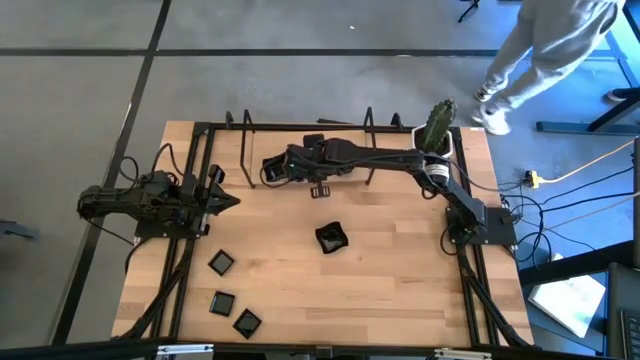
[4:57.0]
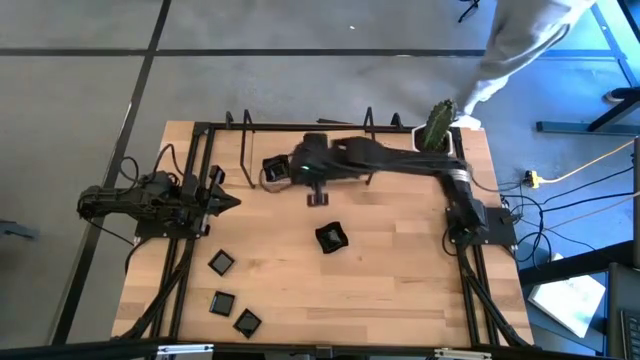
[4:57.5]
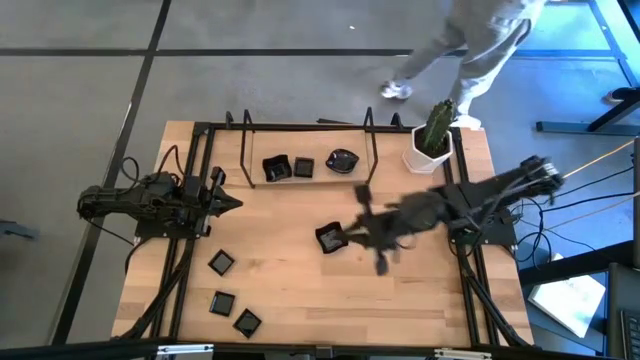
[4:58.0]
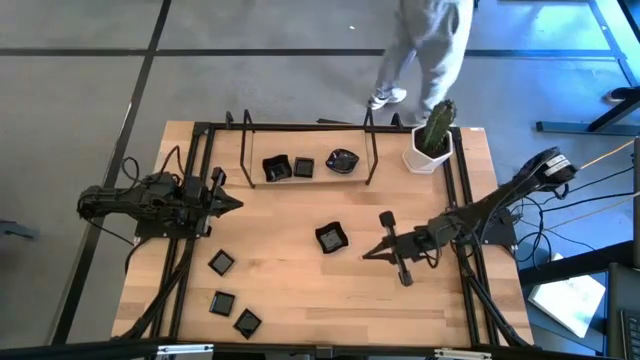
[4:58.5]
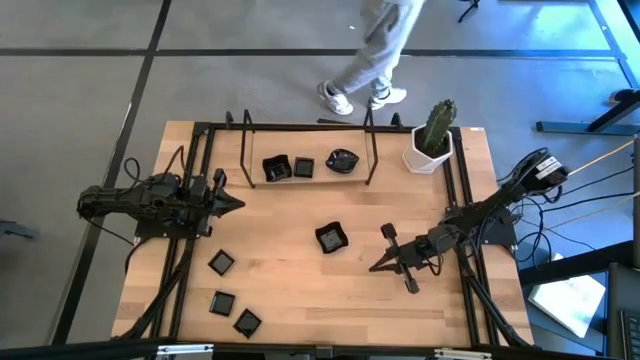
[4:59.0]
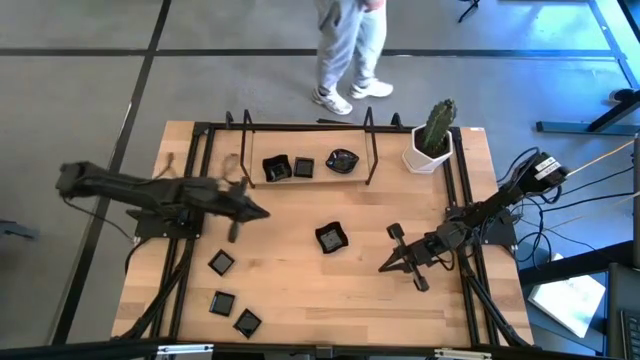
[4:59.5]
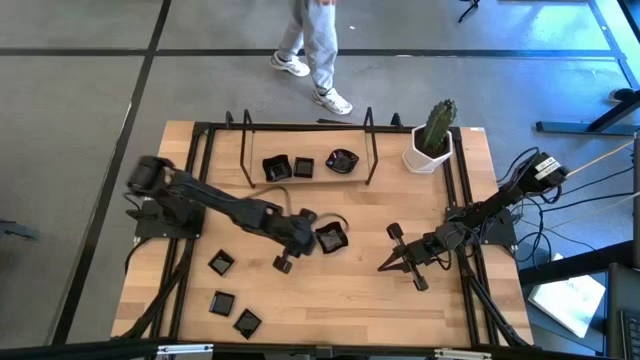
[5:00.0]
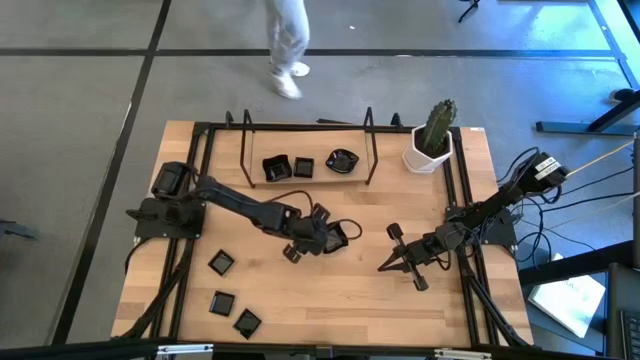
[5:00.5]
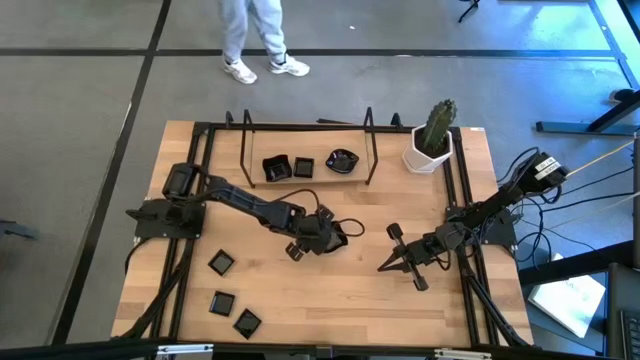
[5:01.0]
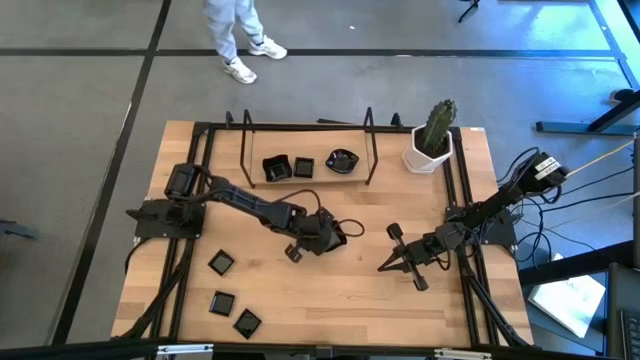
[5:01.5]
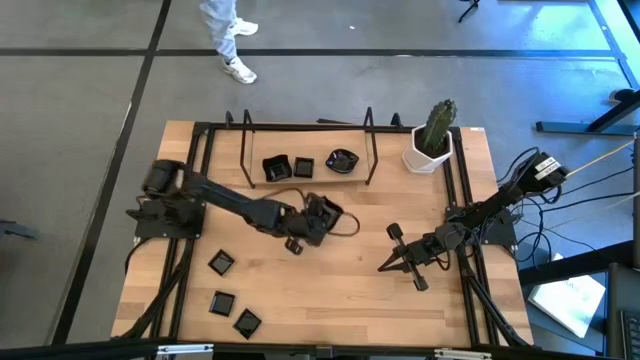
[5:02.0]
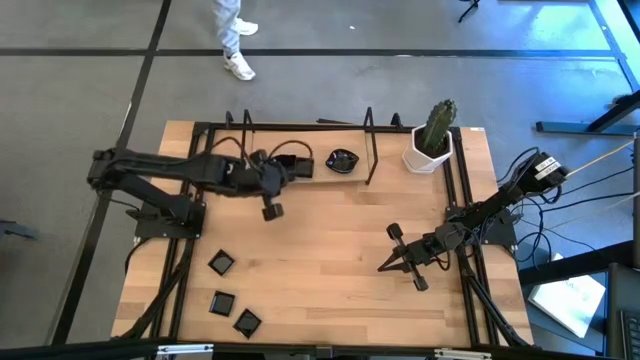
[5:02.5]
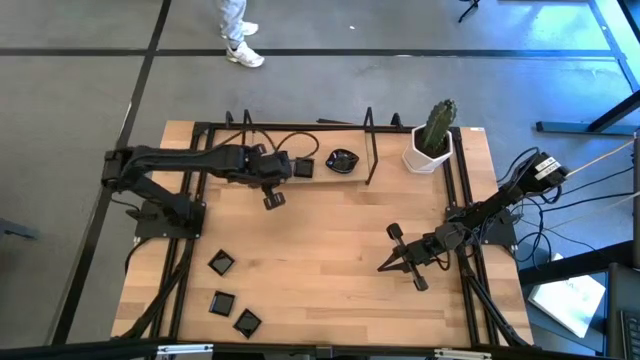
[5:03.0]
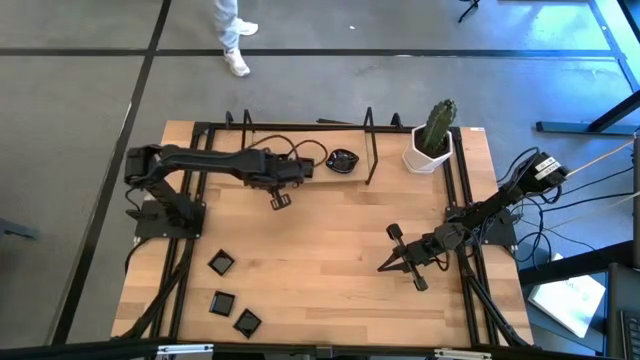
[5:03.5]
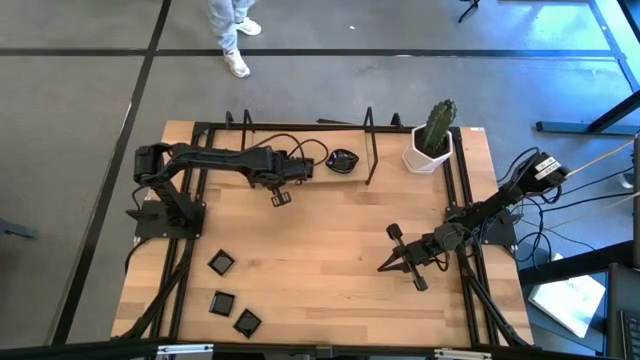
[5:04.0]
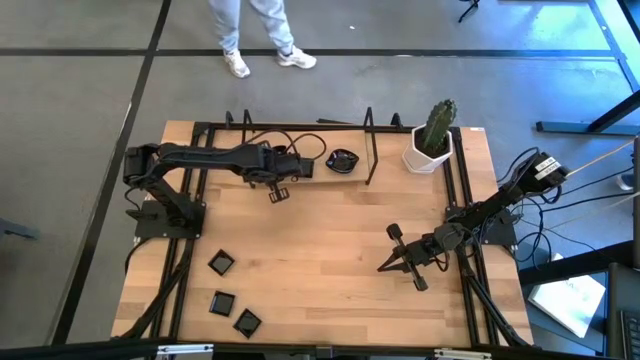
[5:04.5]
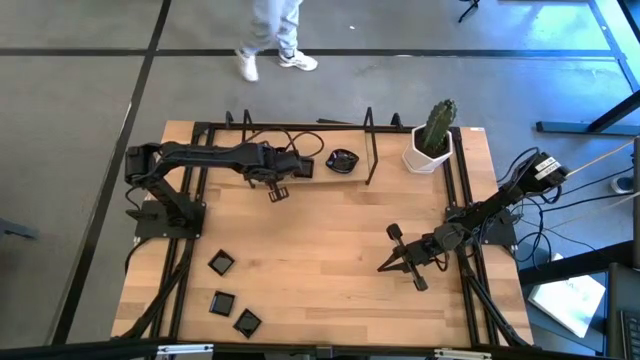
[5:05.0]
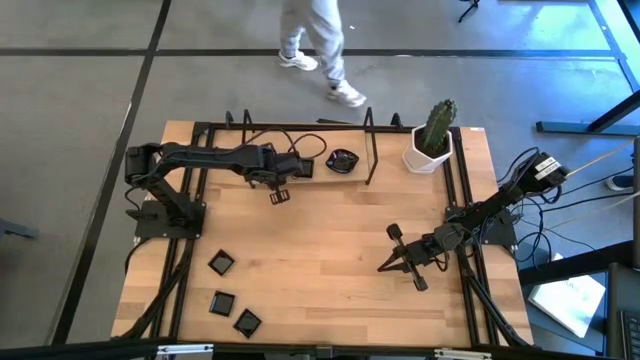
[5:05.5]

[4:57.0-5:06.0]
Task: Pick & Place Mini shaped plates
Stack the distorted square plate on top of the distorted square plate on the shelf

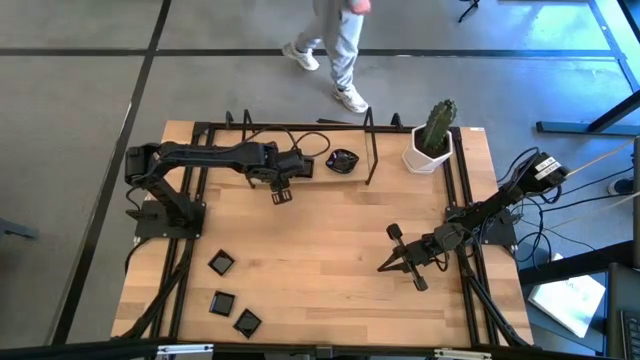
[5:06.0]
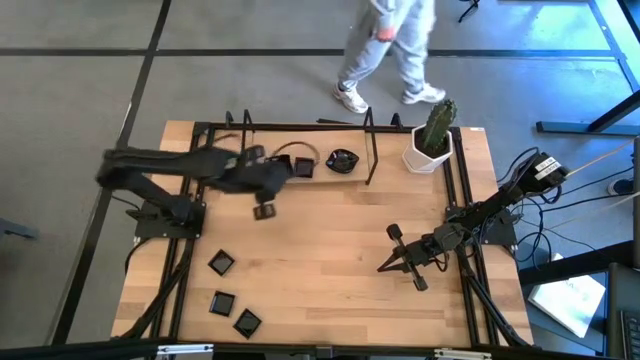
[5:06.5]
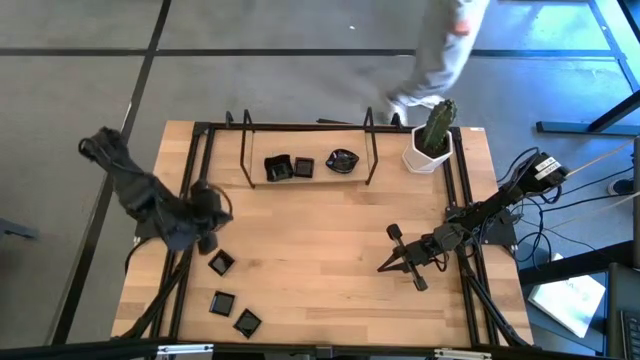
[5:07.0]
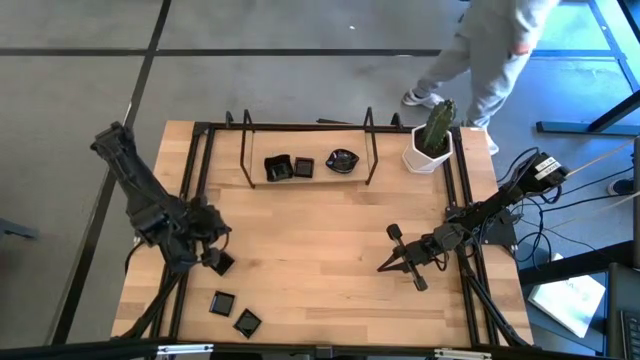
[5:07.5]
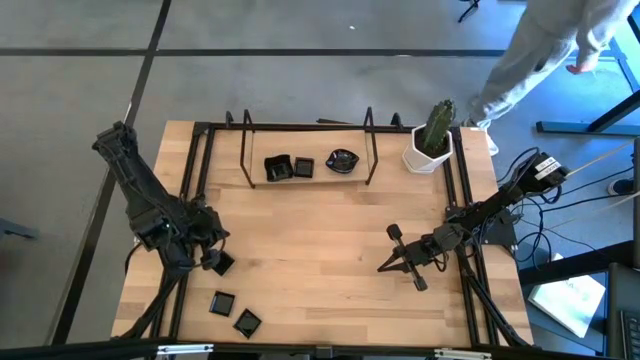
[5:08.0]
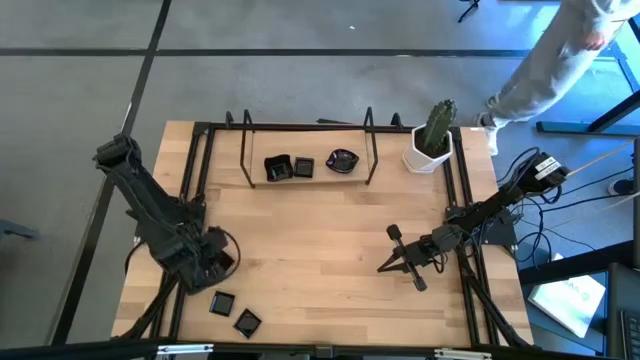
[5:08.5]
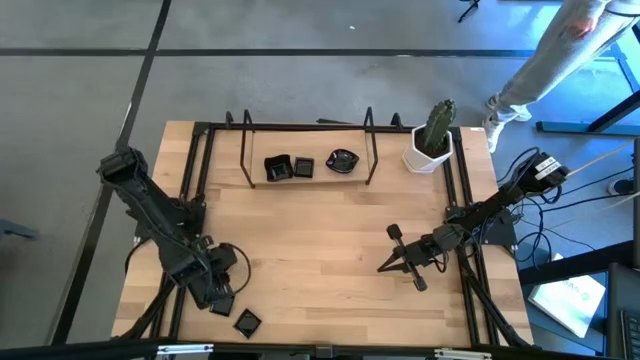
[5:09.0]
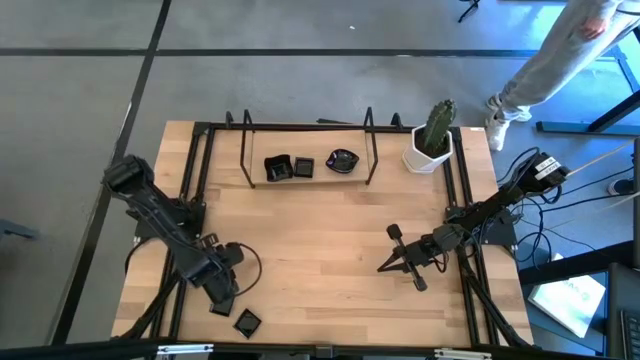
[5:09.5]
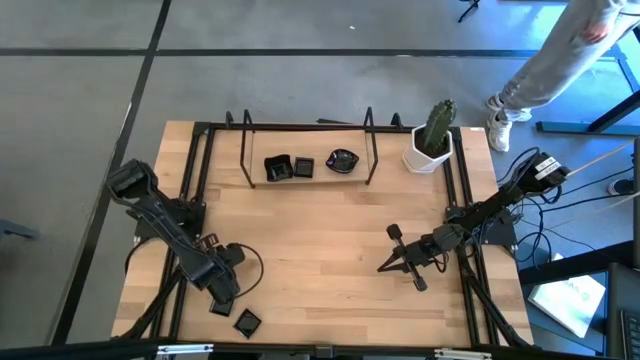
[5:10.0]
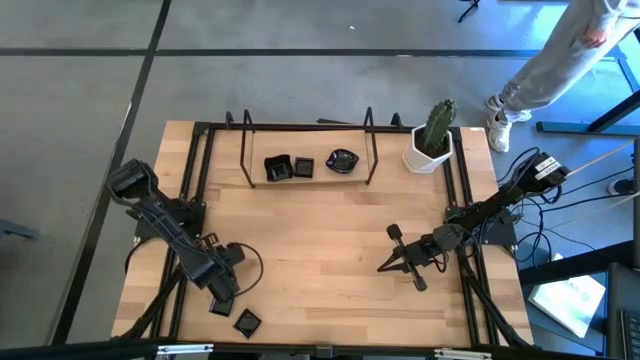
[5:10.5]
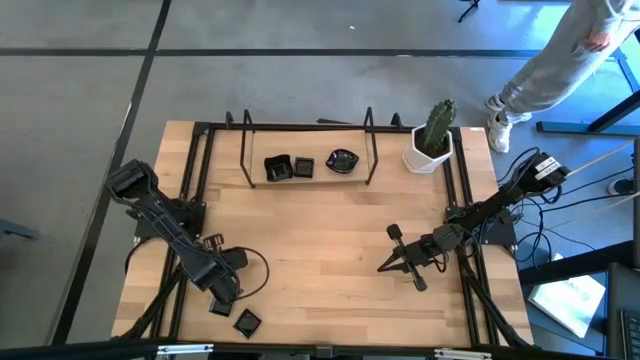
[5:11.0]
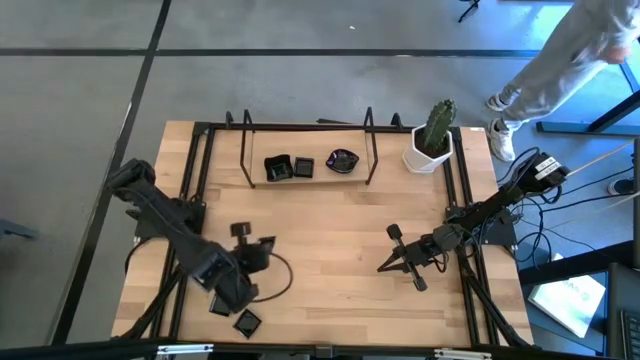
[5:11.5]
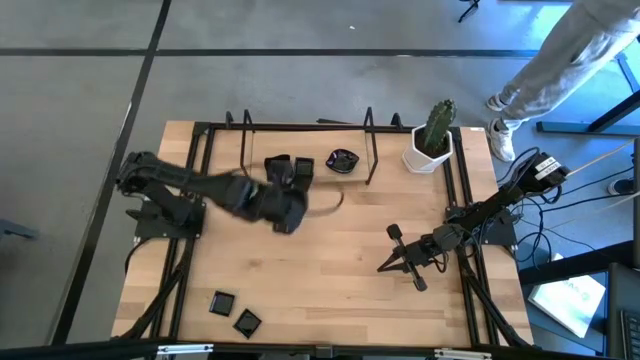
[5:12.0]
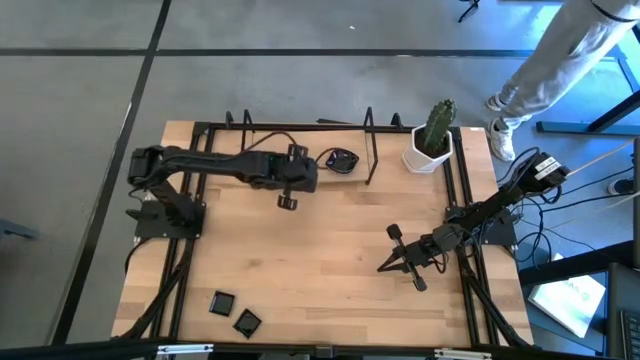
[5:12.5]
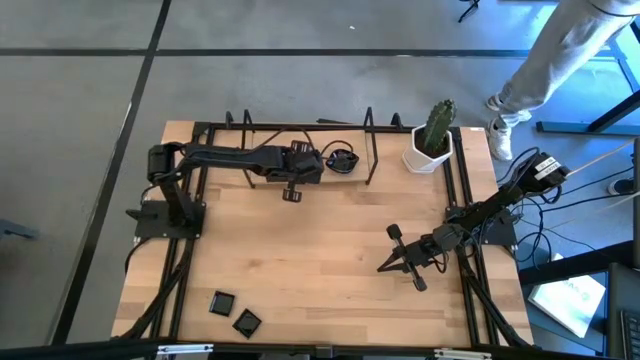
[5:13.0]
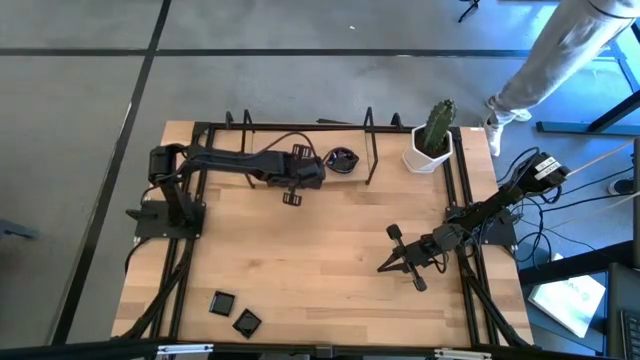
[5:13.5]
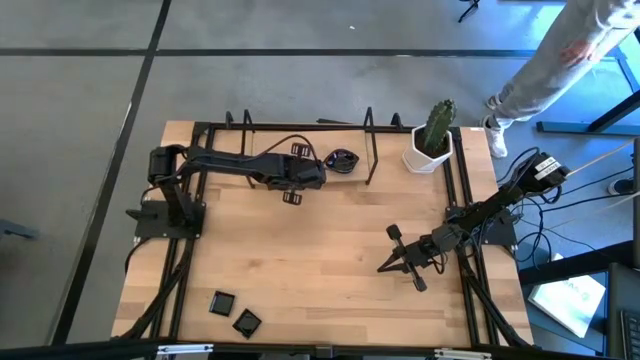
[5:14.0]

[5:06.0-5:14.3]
Stack the square plate on top of the square plate on the shelf

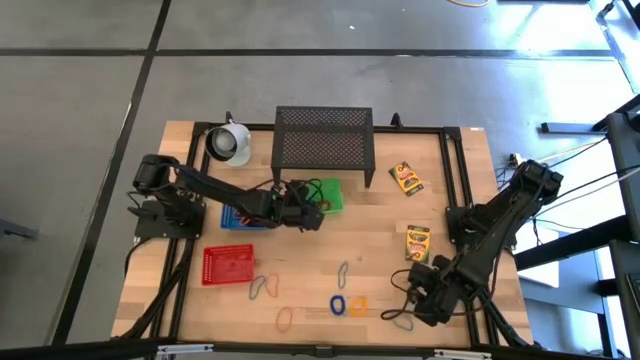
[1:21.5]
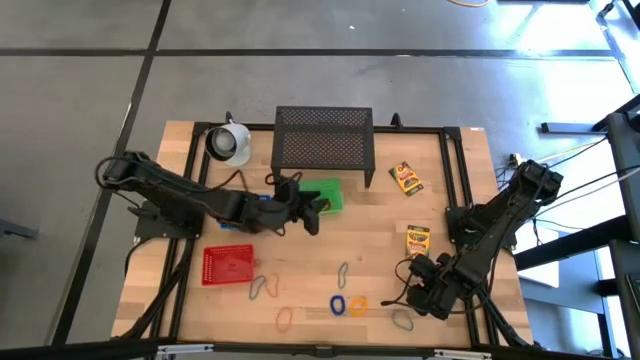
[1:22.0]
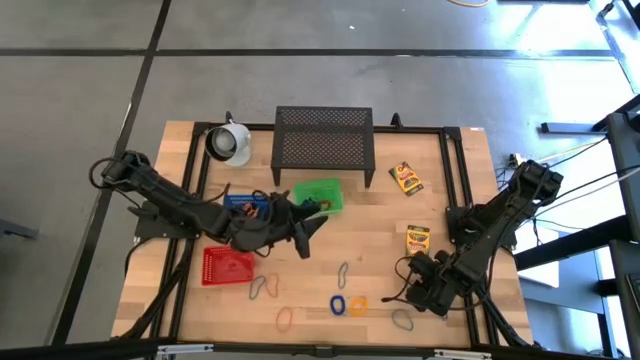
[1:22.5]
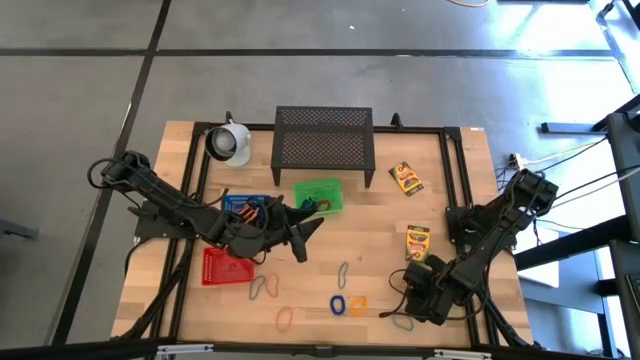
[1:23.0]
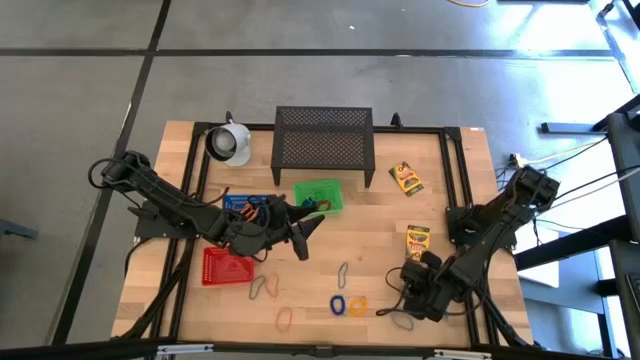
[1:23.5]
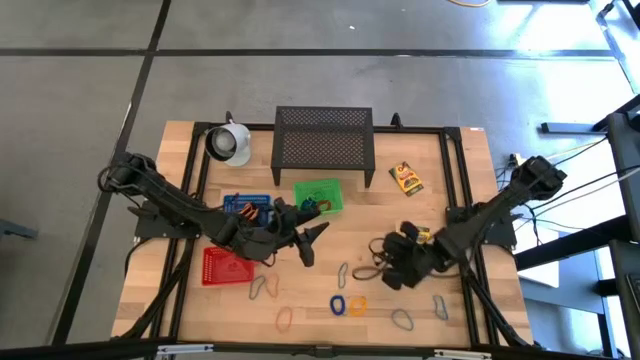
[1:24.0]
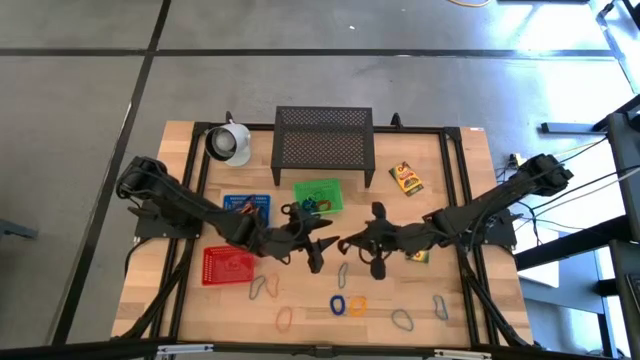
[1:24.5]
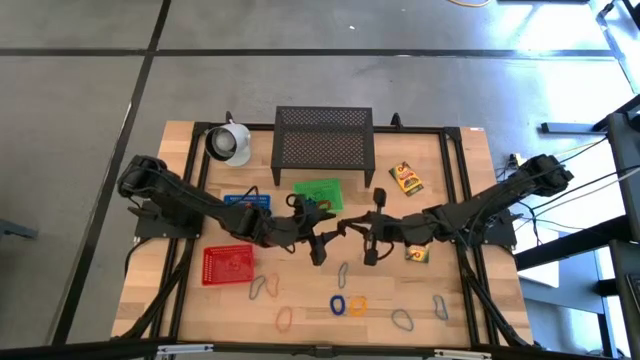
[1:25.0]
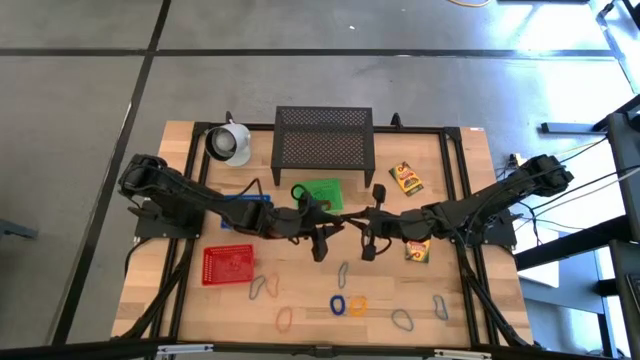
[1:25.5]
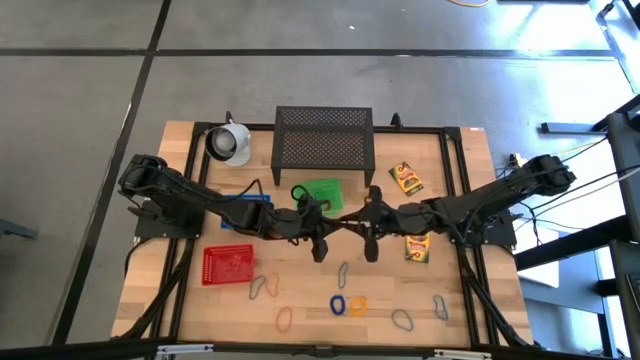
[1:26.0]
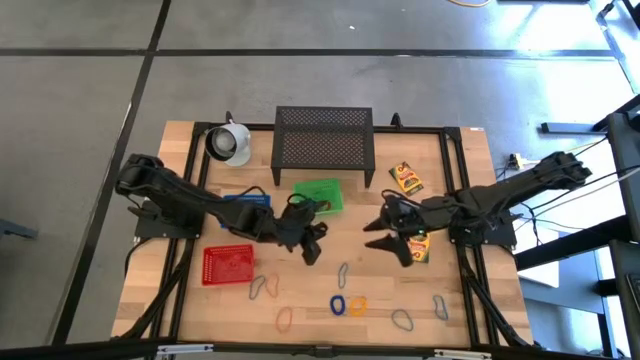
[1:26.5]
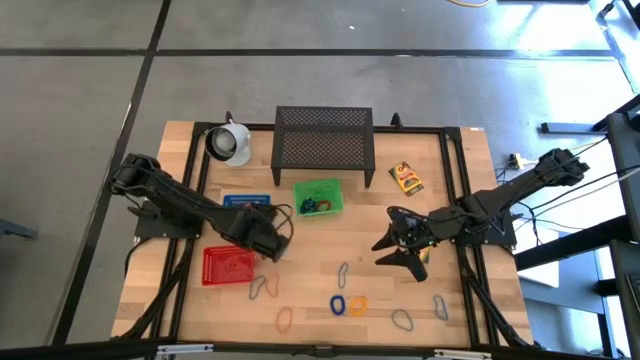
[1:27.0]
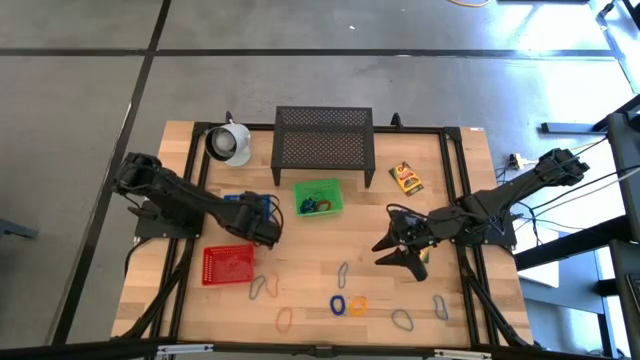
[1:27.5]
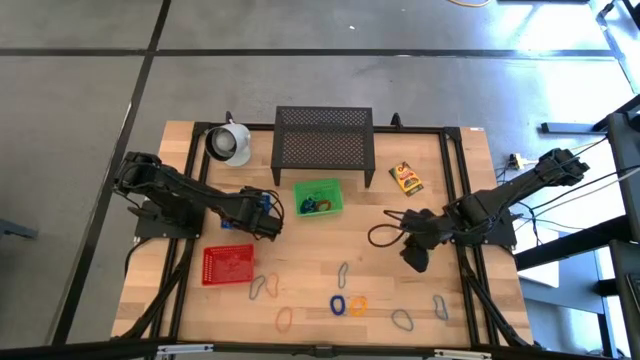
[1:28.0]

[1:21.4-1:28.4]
Task: Pick & Place Office Desk Supplies
Put the black rubber band into the blue bin
